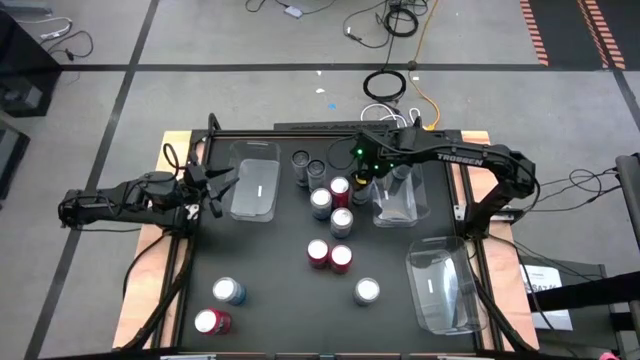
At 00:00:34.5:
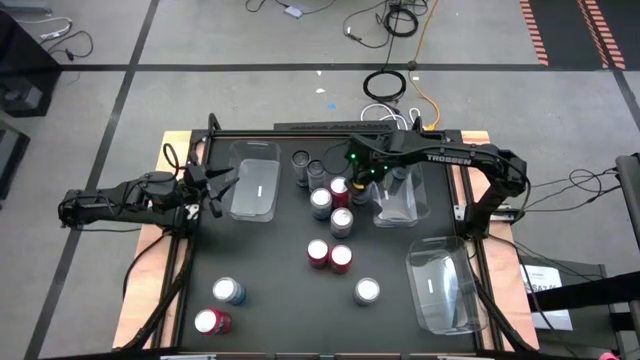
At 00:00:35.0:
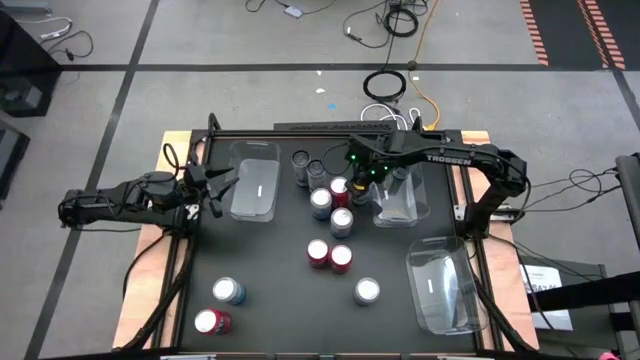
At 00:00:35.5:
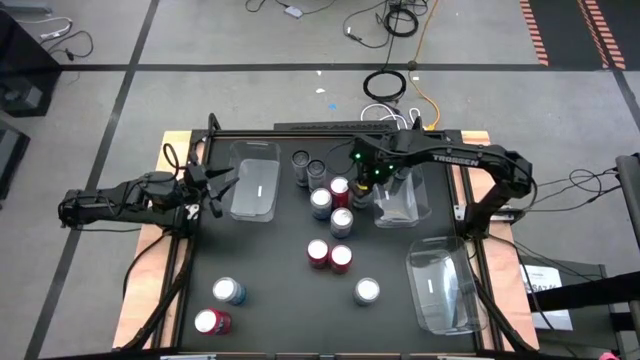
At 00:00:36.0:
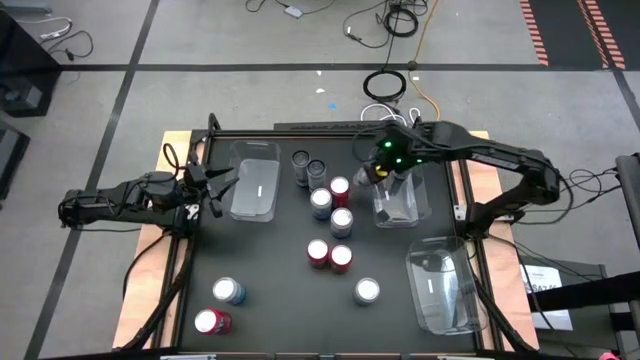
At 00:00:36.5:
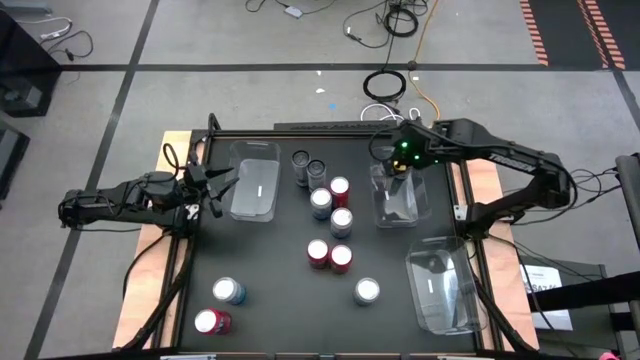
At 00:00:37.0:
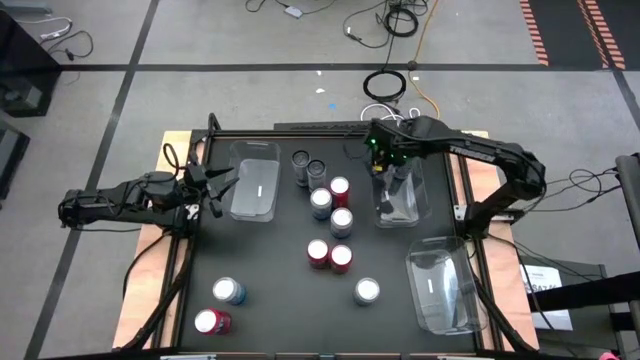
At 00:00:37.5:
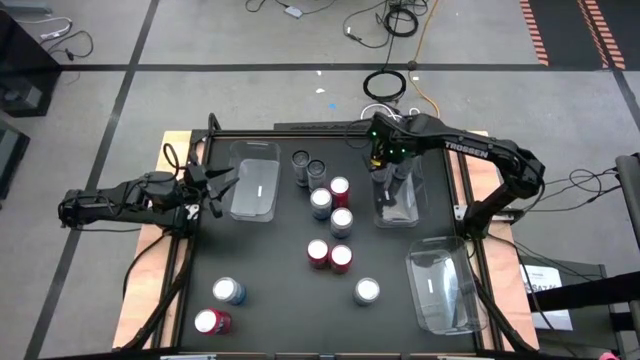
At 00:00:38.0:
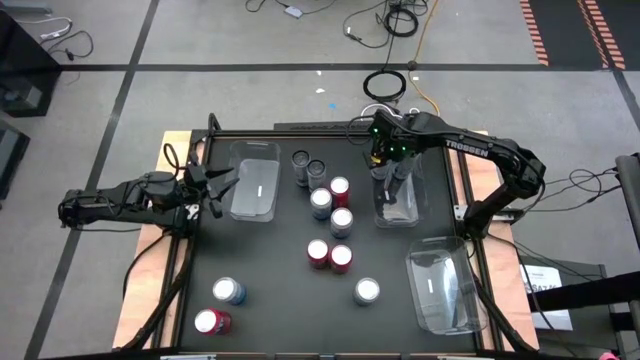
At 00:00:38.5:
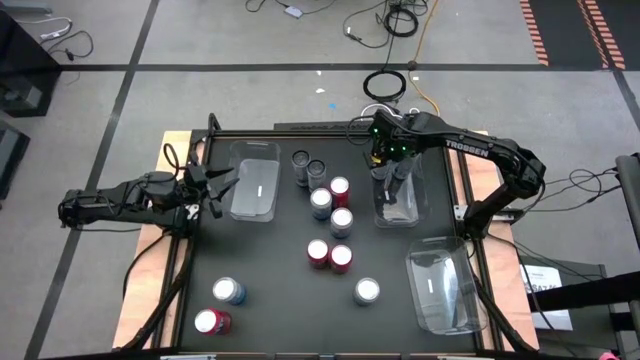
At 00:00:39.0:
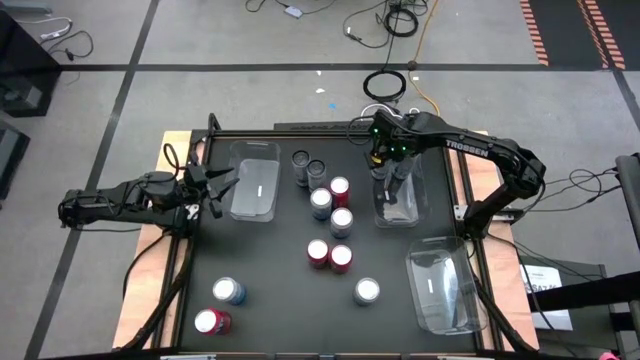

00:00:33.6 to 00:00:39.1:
Task: Sort soda cans
Put the white soda can into the top right transparent bin

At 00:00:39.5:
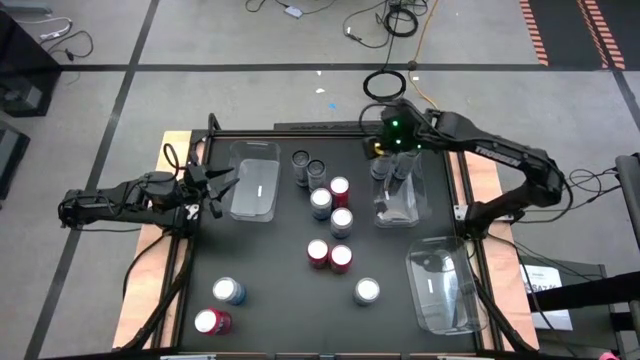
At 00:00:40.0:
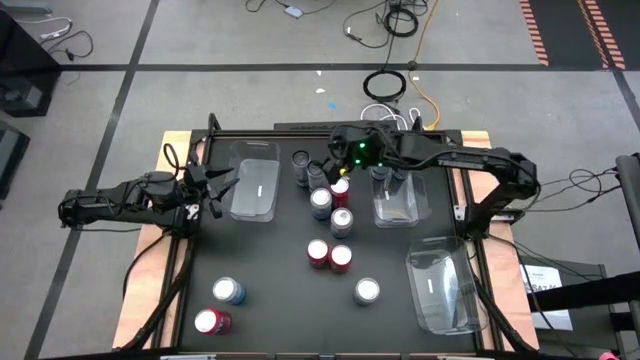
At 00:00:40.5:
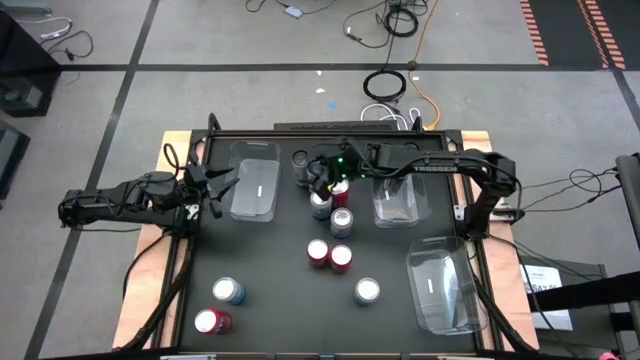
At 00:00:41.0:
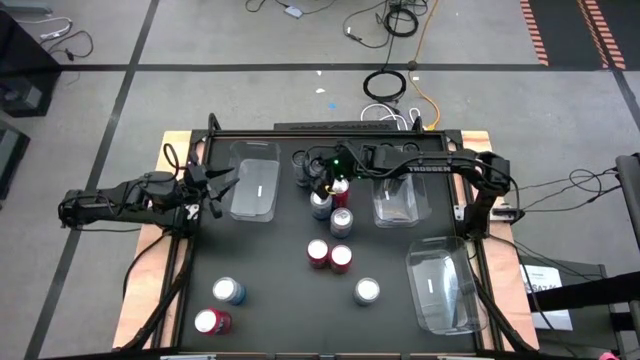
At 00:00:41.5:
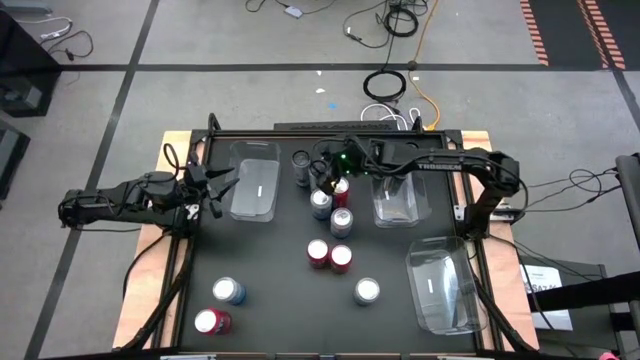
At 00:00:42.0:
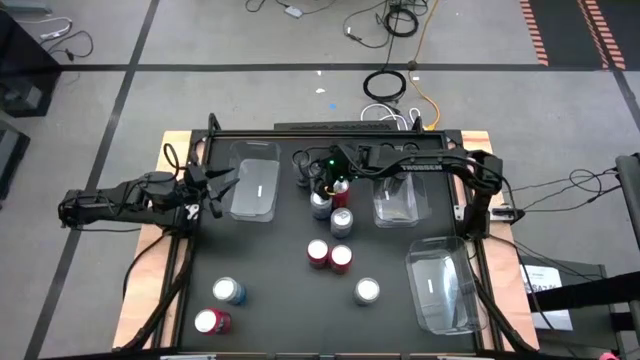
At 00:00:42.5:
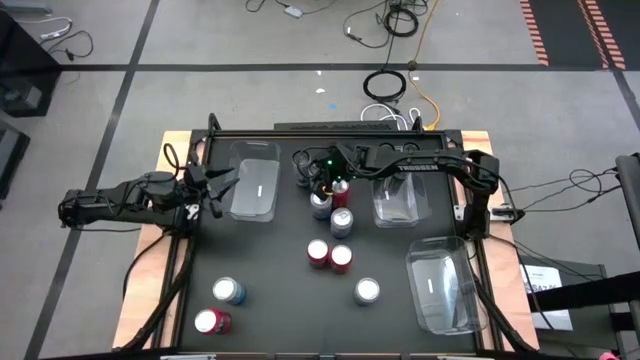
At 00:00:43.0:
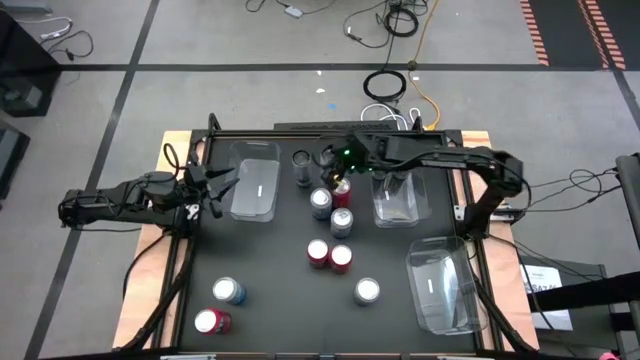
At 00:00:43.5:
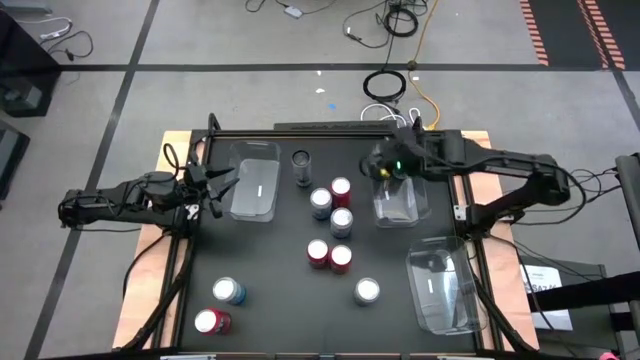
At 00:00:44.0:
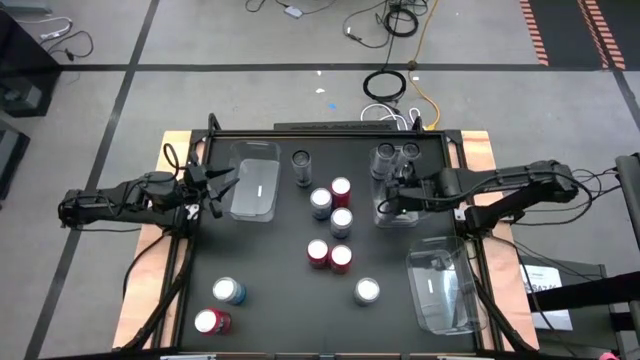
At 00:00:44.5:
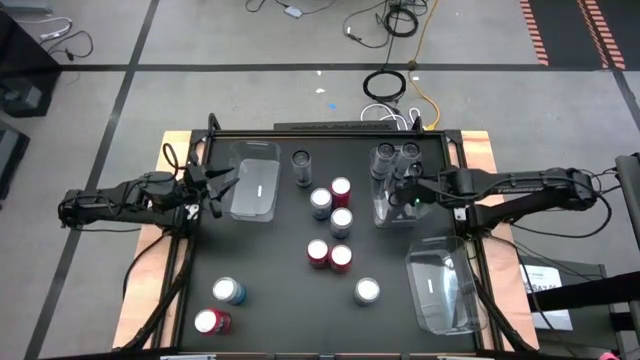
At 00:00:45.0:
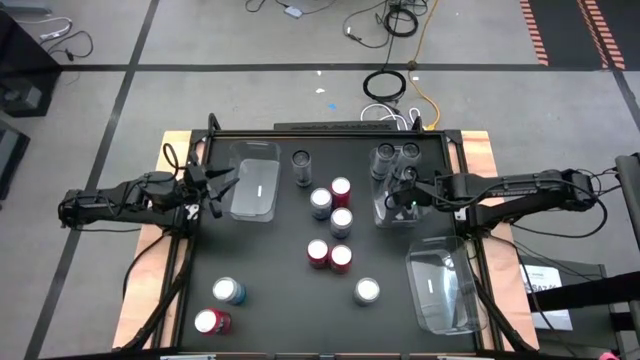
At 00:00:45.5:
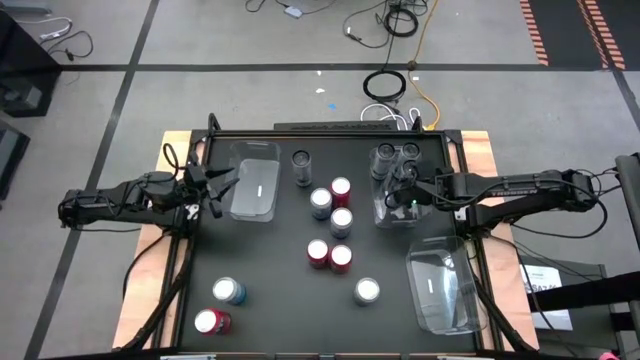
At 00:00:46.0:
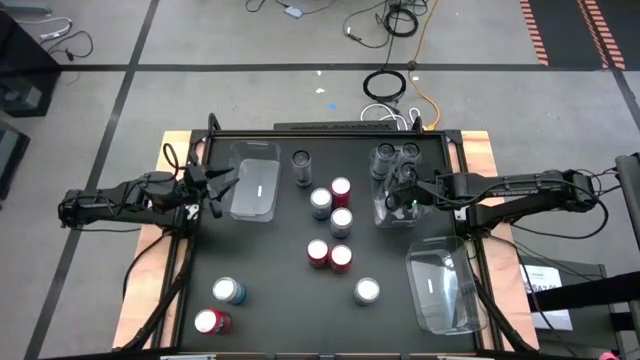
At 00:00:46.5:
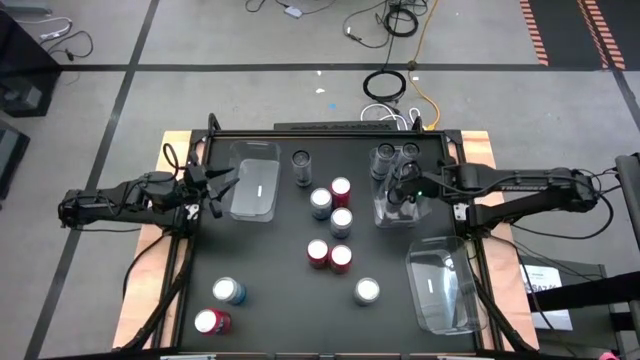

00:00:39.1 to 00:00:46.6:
Put the white soda can into the top right transparent bin

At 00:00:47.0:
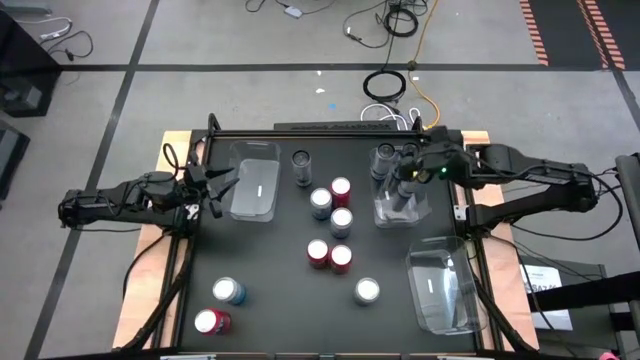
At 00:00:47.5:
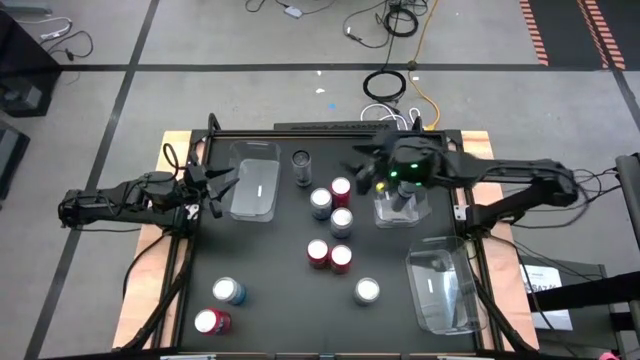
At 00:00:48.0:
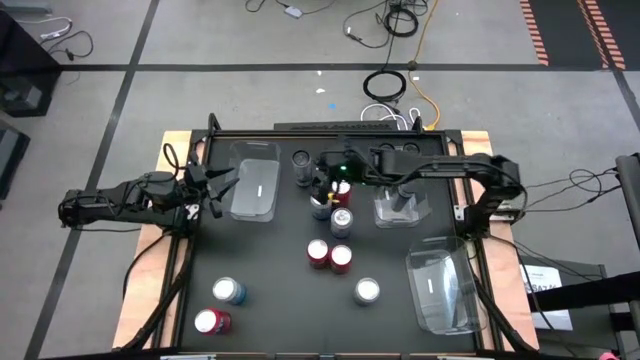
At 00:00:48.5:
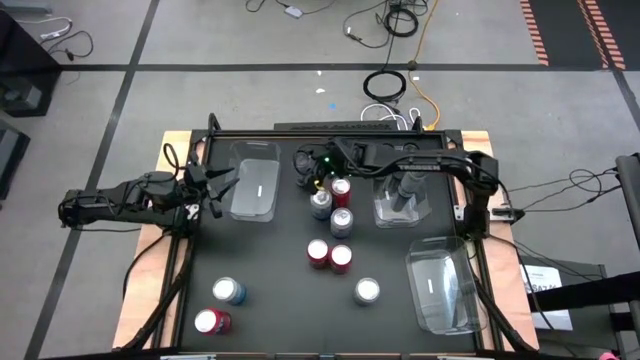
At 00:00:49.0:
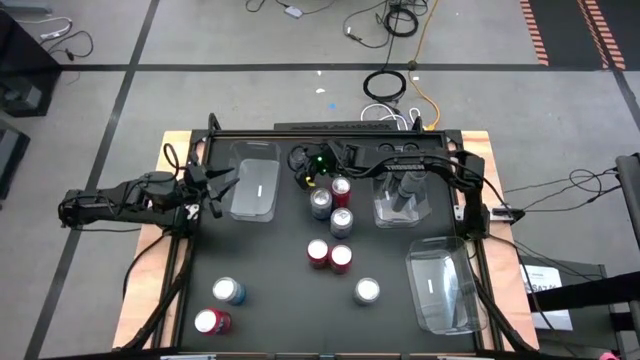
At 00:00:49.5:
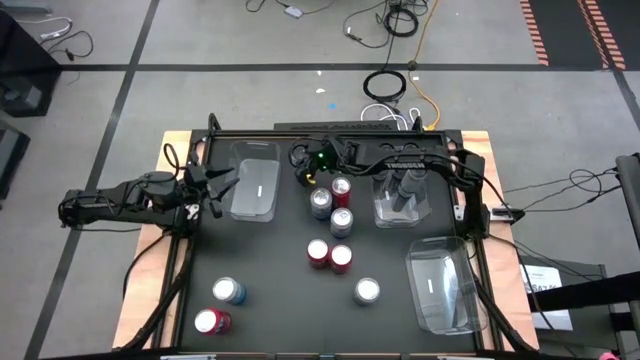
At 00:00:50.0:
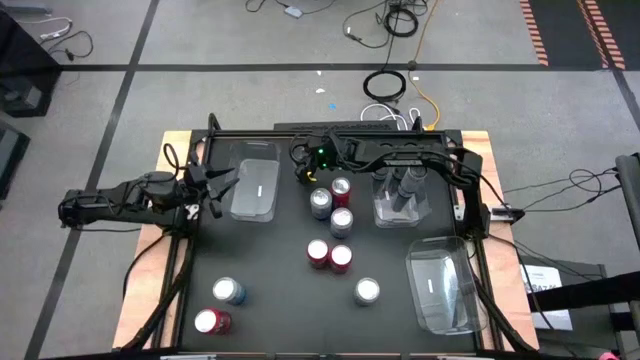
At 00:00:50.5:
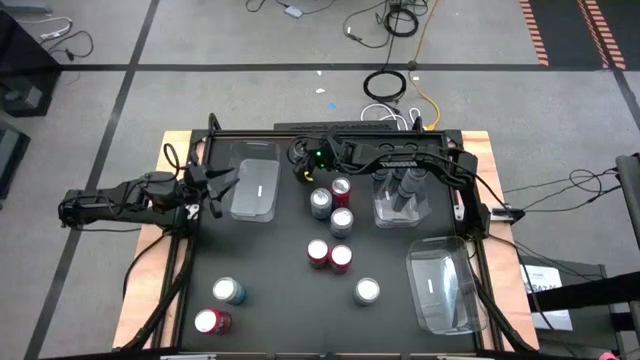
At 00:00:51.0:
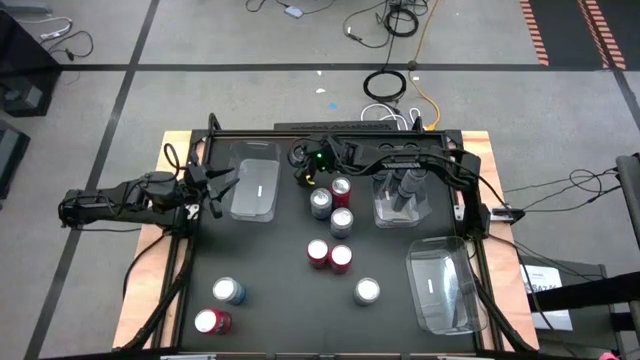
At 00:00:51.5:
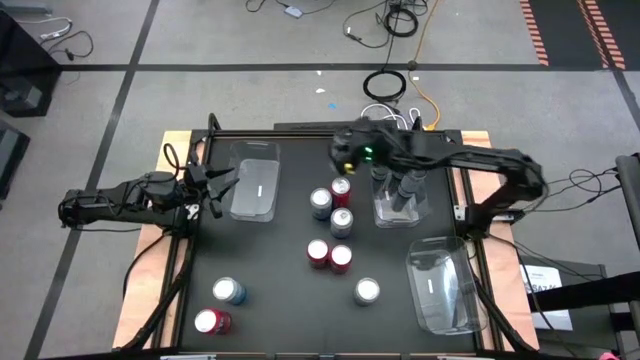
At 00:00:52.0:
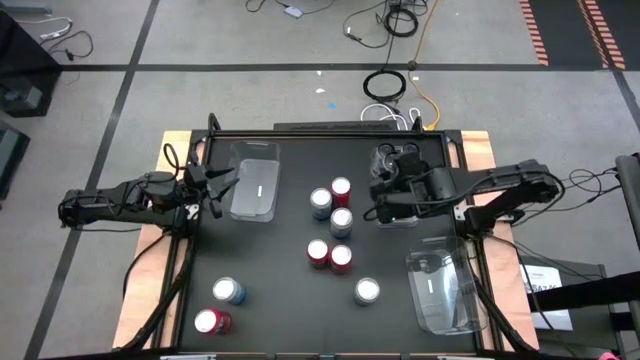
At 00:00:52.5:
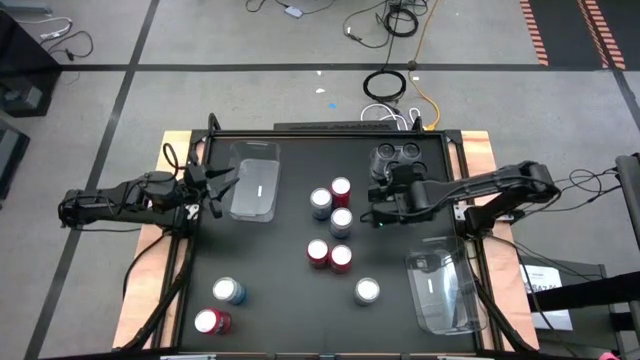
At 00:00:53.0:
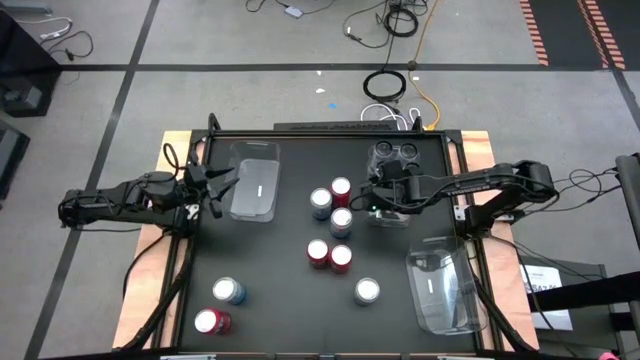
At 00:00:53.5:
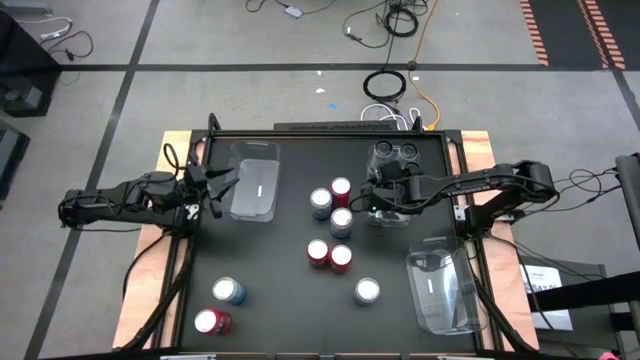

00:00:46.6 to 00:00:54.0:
Put the white soda can into the top left transparent bin

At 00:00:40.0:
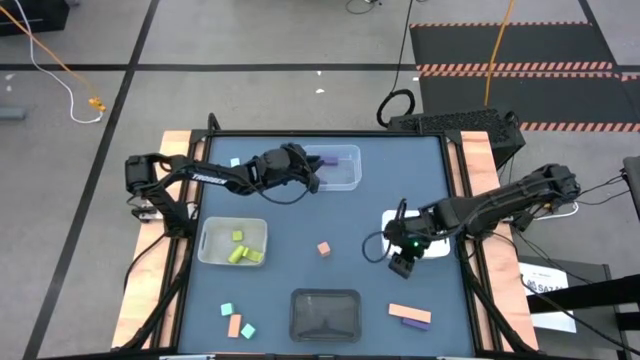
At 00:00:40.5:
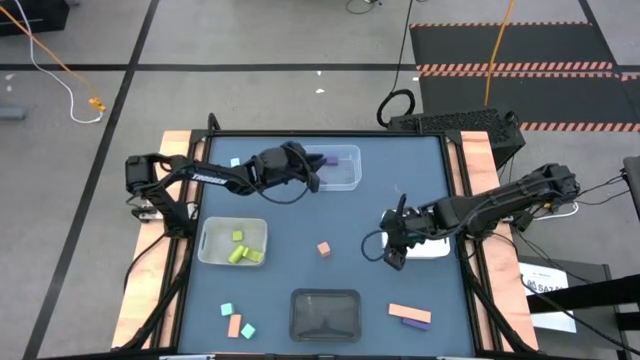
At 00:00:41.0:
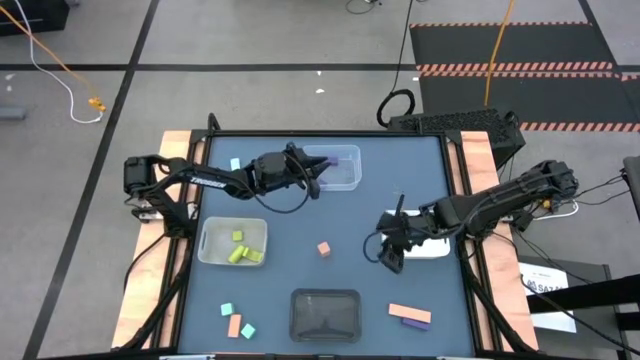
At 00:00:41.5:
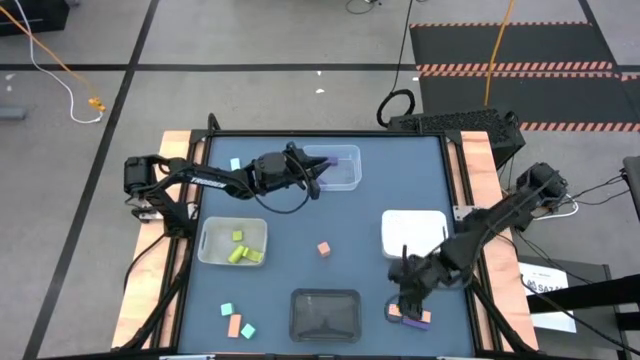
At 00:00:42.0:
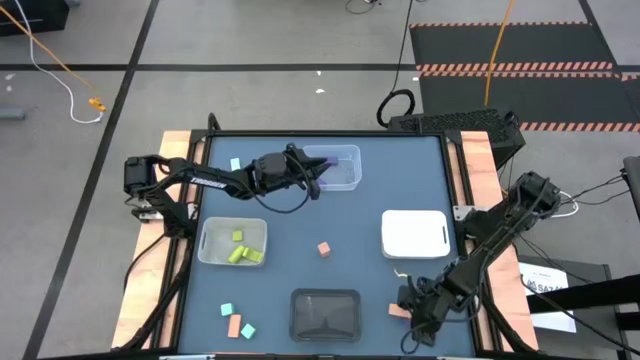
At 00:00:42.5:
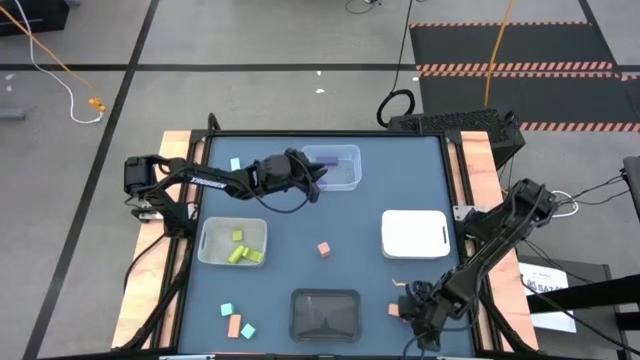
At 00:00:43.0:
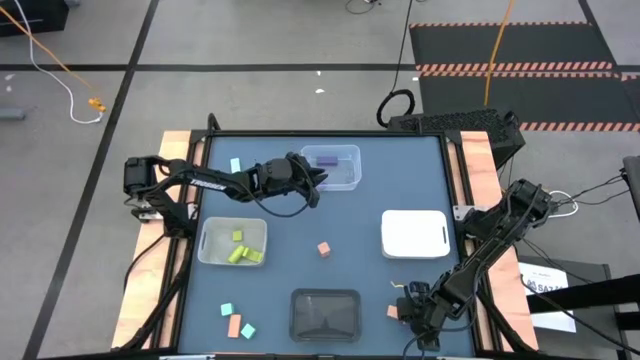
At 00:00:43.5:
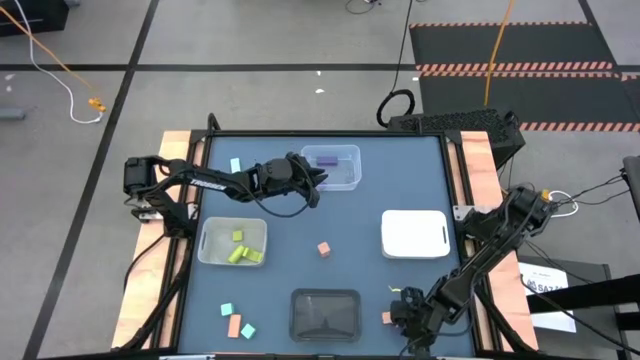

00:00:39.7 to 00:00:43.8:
Task: Sort & place blocks by color
Put the purple block into the transparent bin
